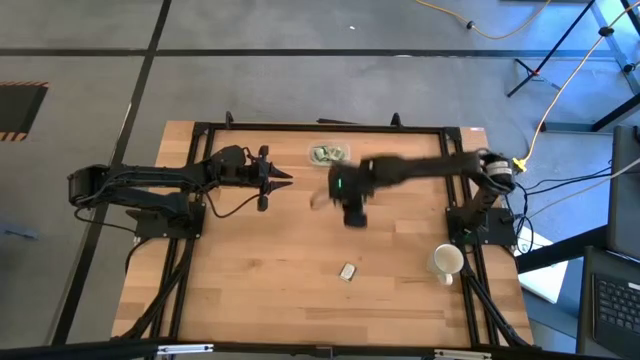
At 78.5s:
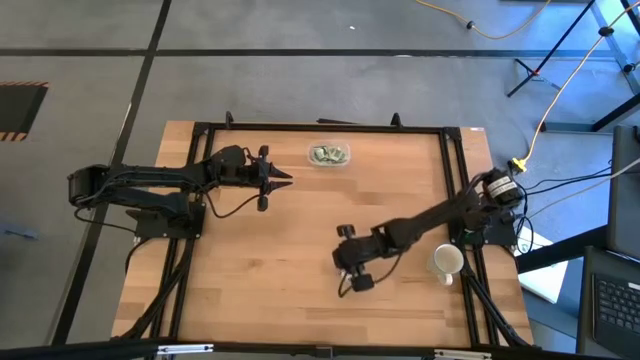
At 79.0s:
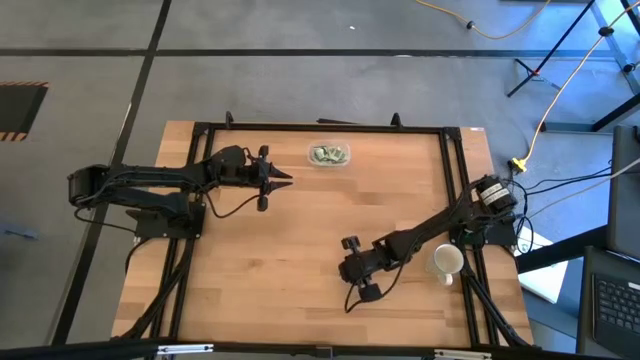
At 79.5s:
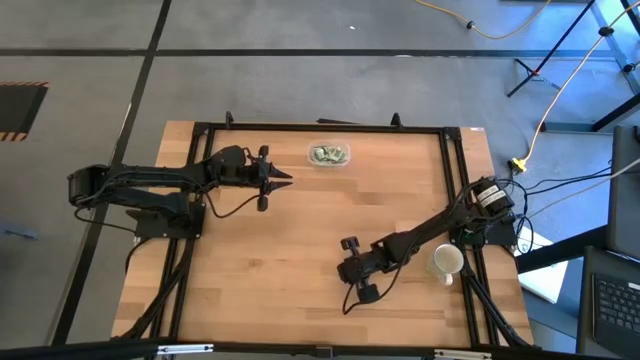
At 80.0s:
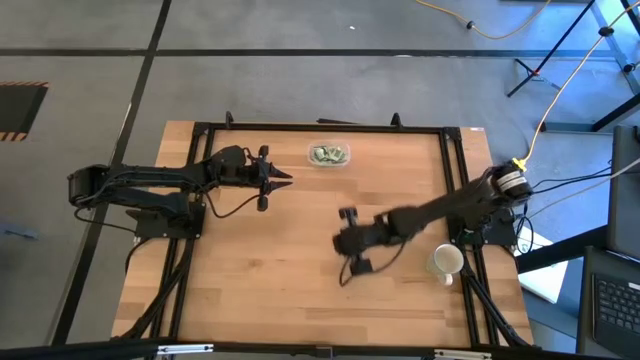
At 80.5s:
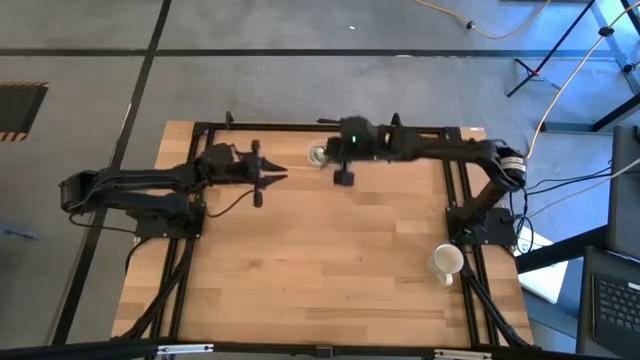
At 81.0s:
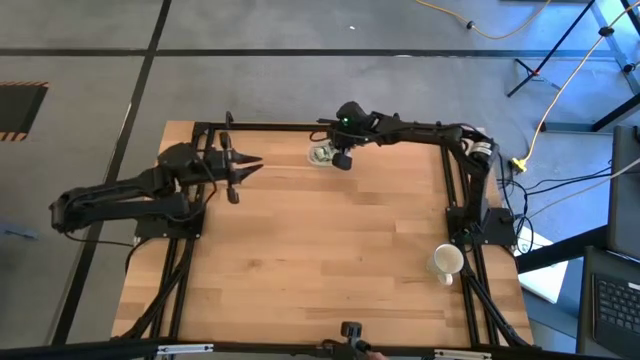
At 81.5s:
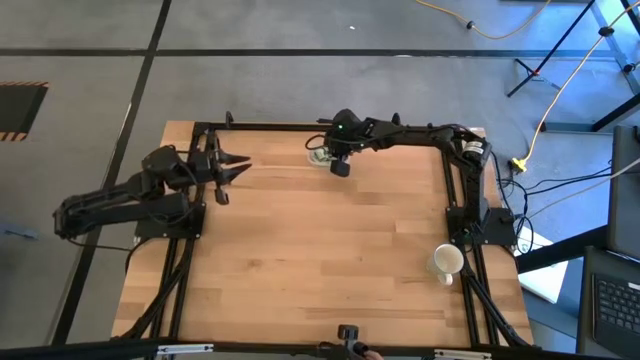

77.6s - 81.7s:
Task: Pick and place items into bin
Put the green stevia packet into the transparent bin

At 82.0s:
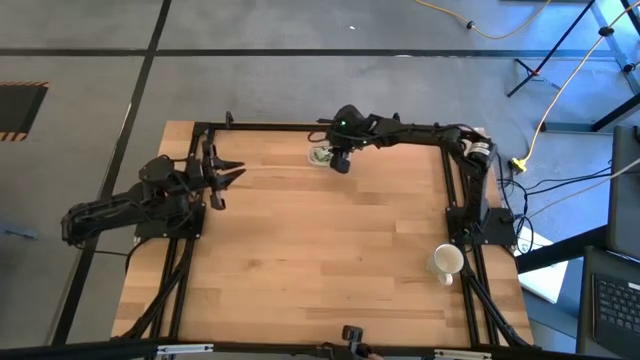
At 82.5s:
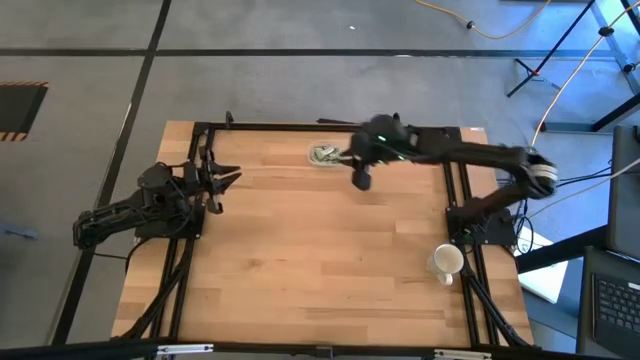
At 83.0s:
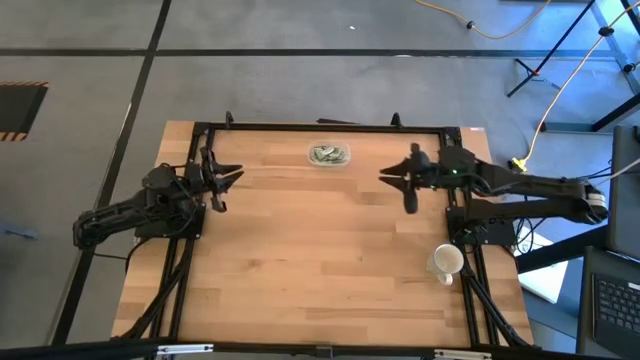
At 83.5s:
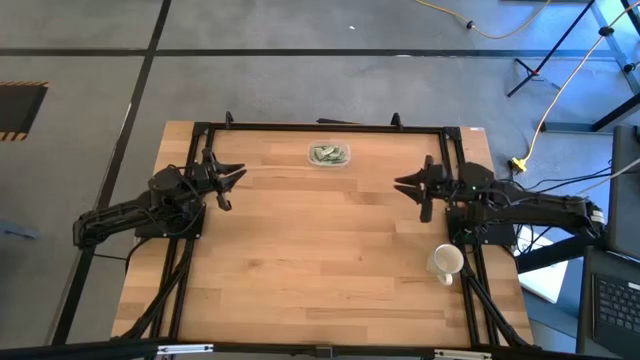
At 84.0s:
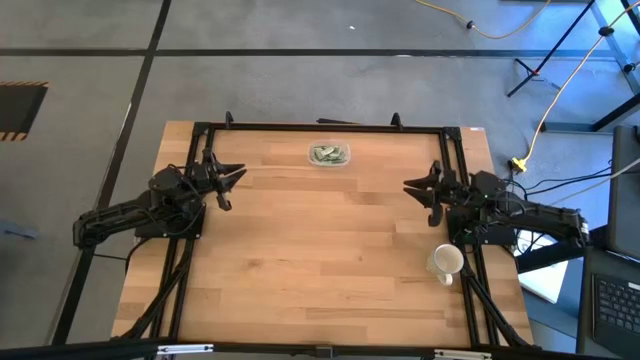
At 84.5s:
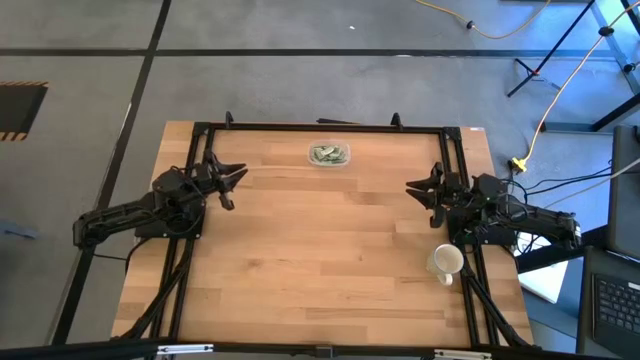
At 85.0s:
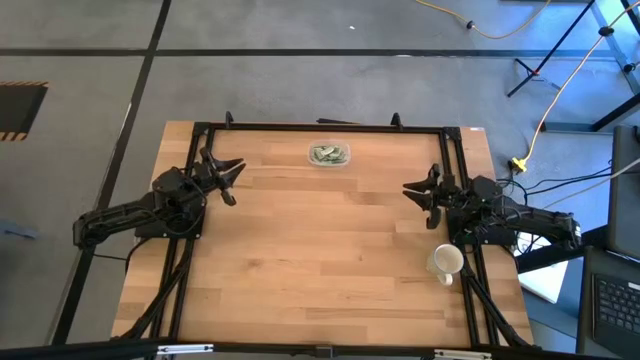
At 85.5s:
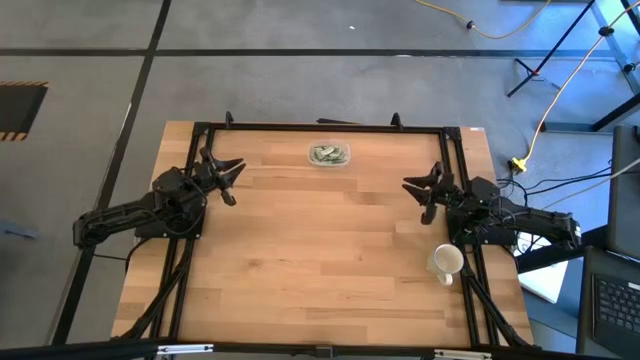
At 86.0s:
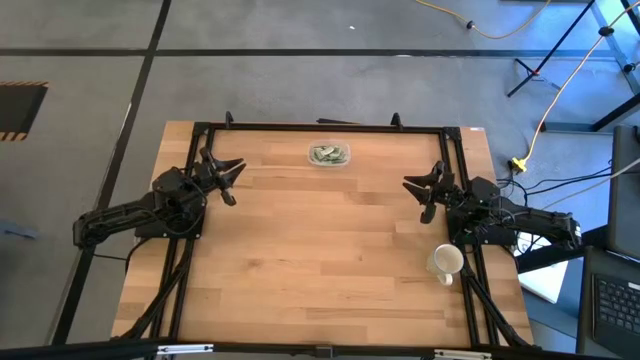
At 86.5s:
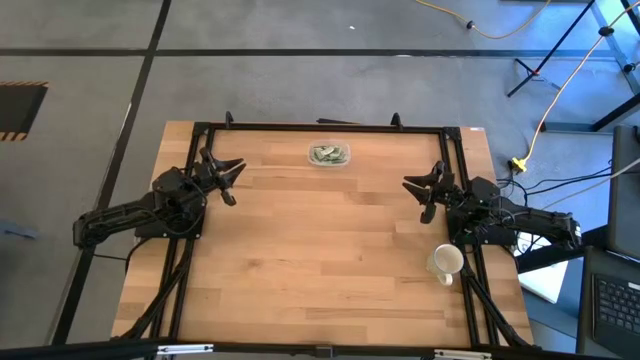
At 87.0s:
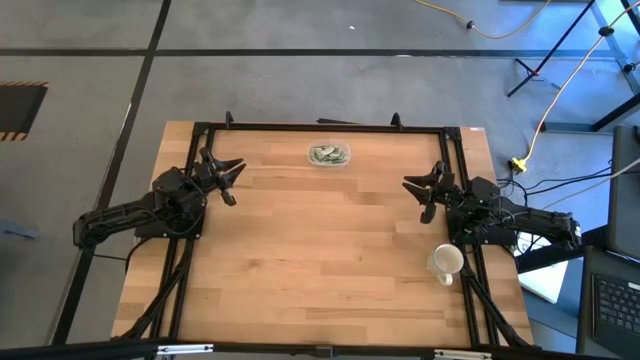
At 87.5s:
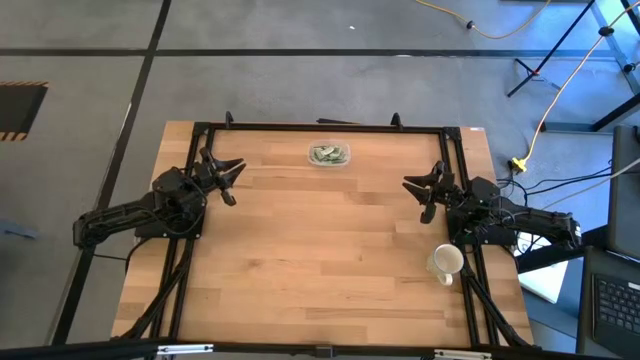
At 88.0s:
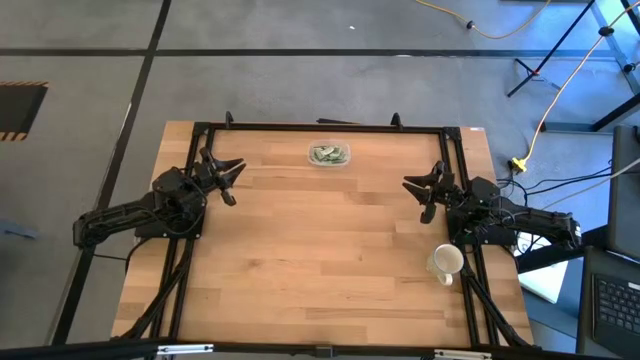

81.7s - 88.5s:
Return to Home Position

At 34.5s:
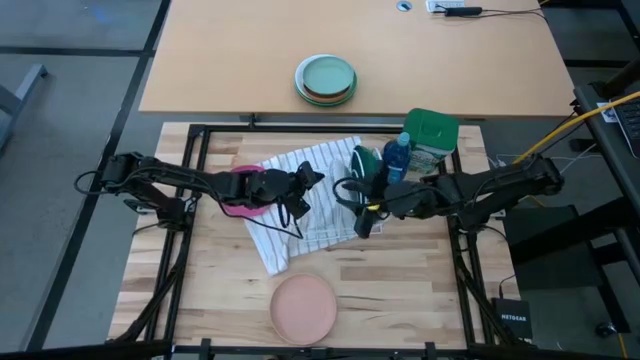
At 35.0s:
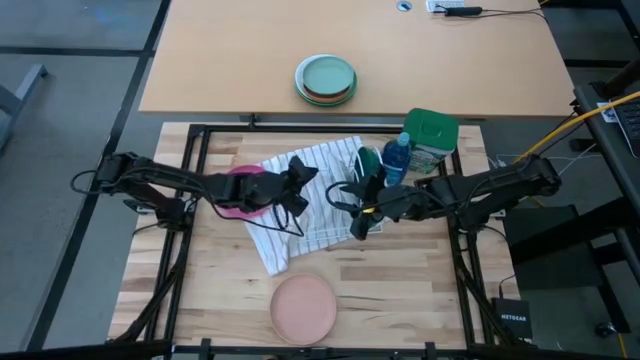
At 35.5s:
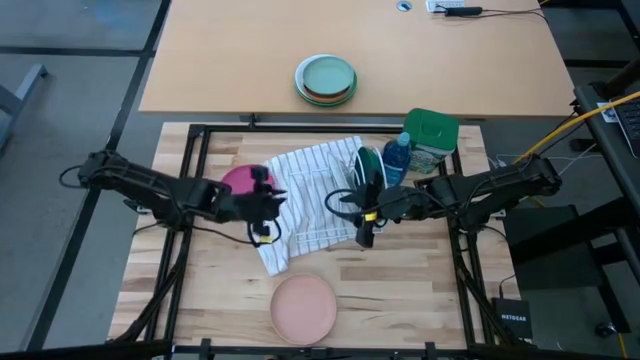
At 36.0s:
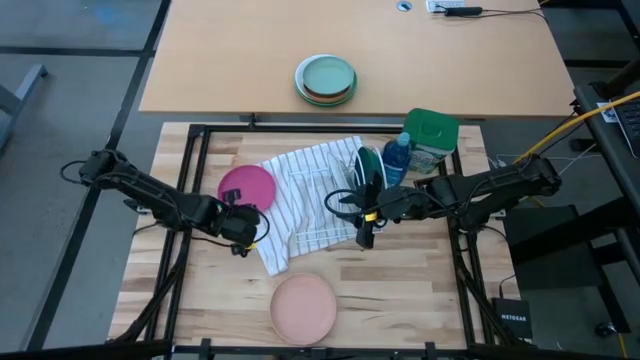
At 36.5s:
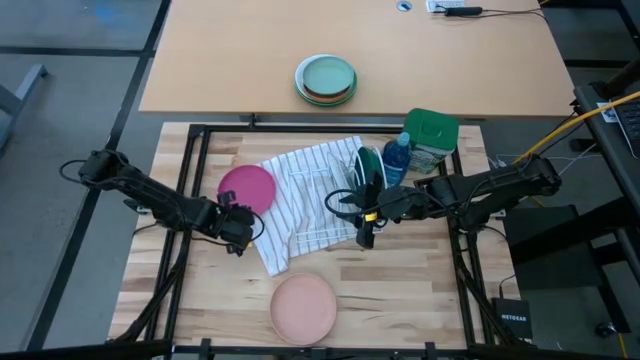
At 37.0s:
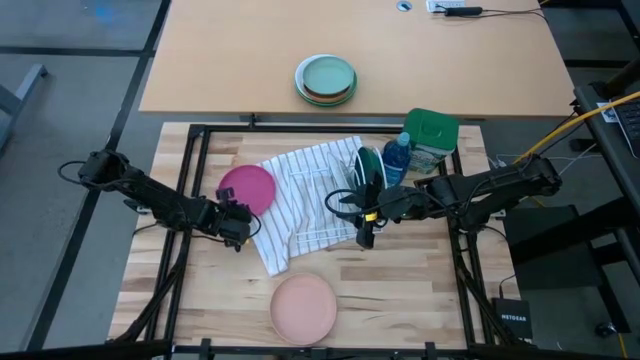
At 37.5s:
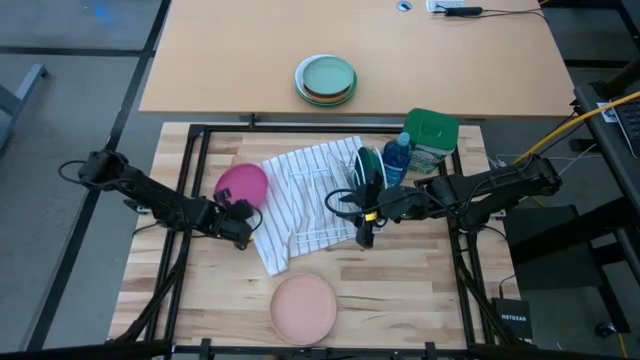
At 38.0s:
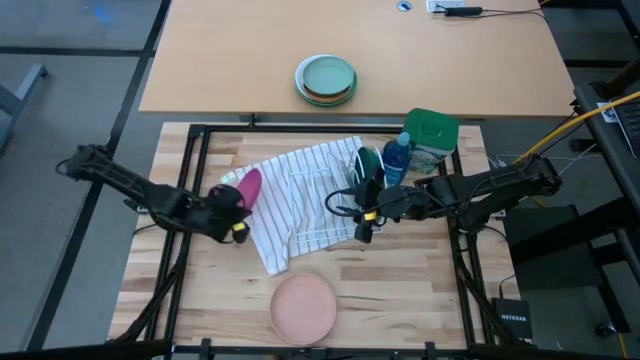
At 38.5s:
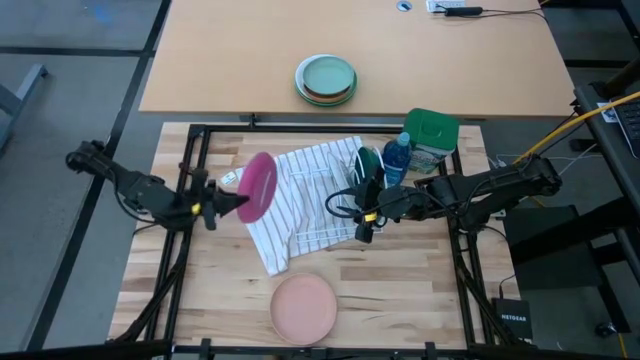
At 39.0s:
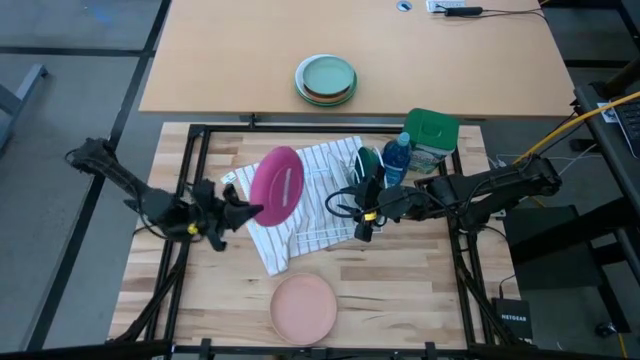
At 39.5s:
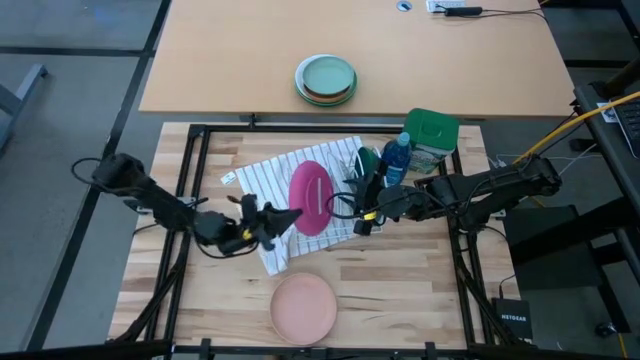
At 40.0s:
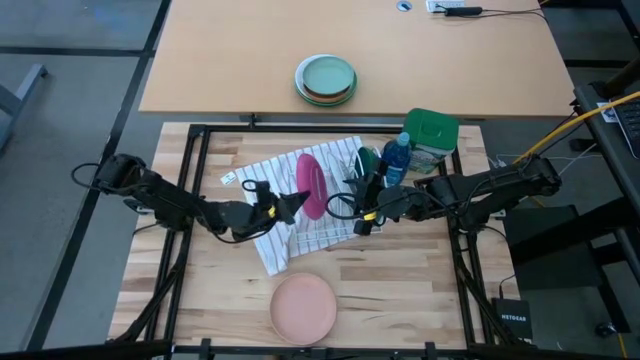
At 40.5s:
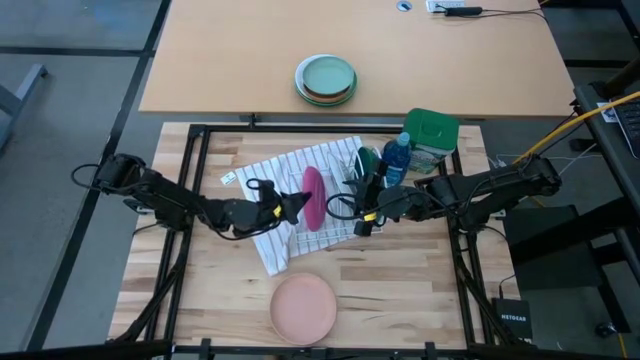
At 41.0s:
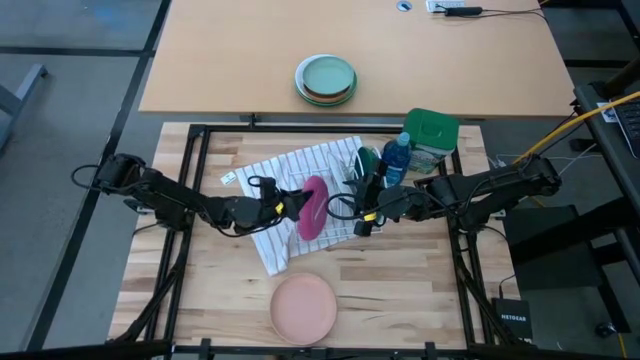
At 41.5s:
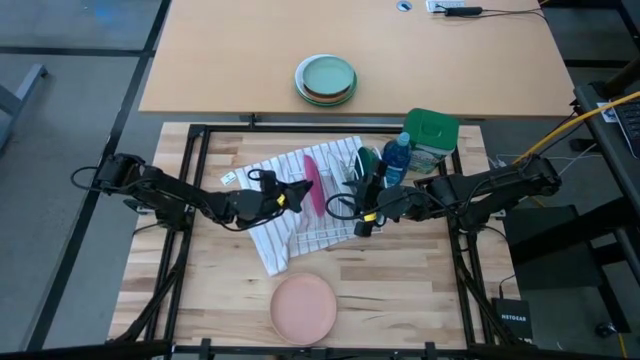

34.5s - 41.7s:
Task: Sort dishes
Put the pink plate in the dish rack

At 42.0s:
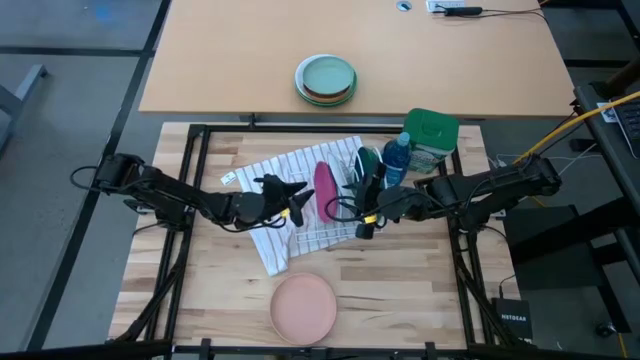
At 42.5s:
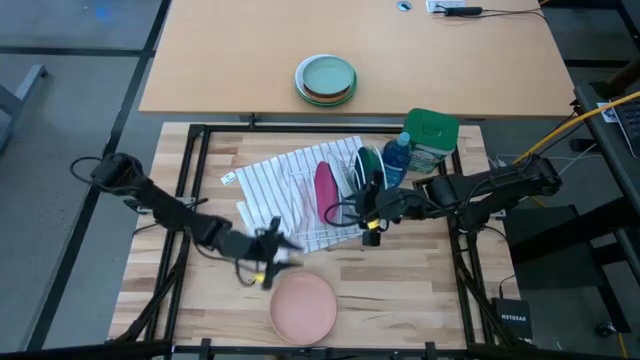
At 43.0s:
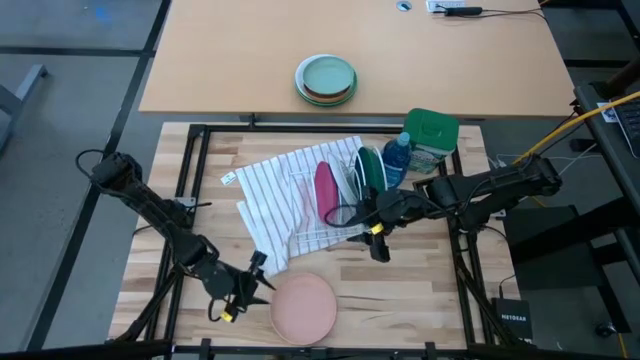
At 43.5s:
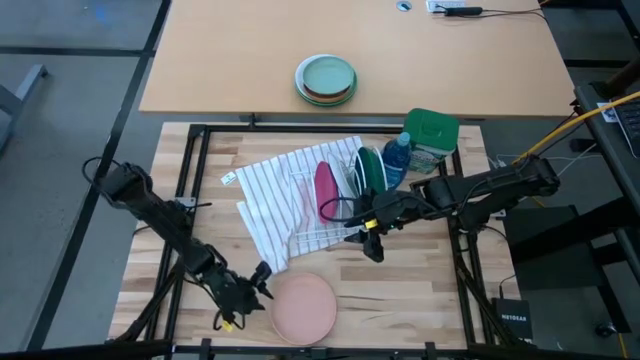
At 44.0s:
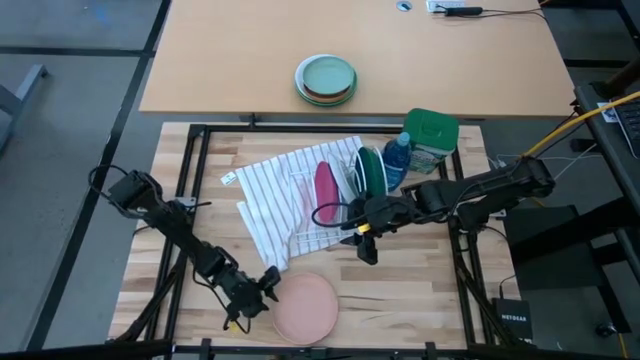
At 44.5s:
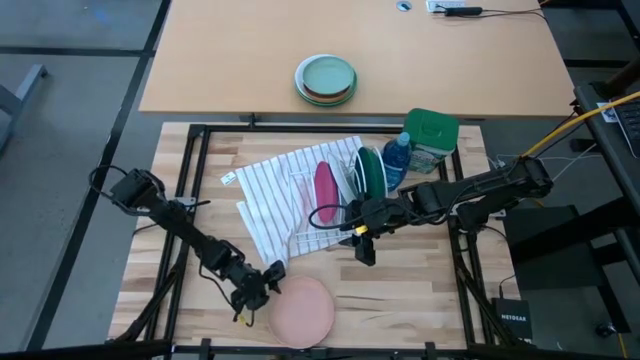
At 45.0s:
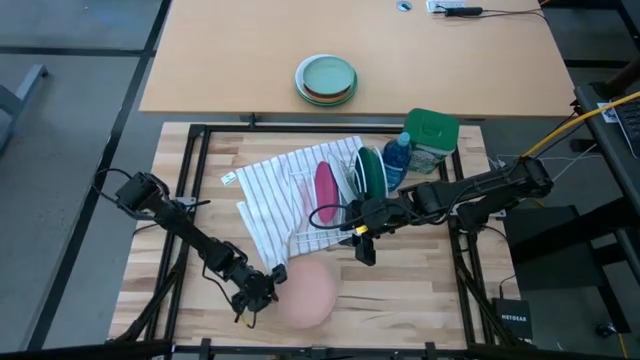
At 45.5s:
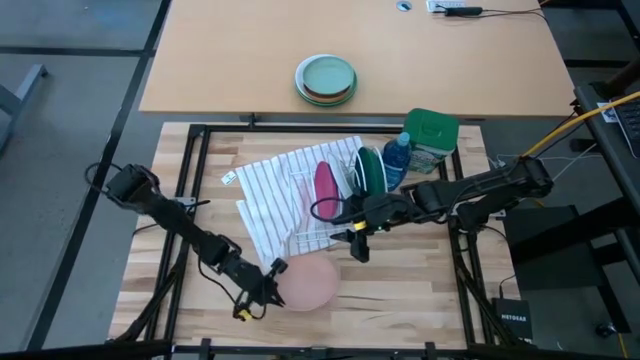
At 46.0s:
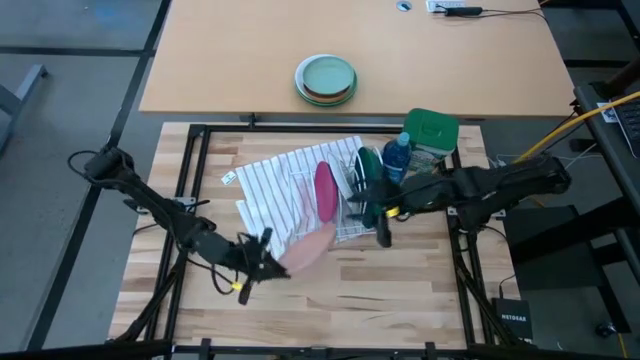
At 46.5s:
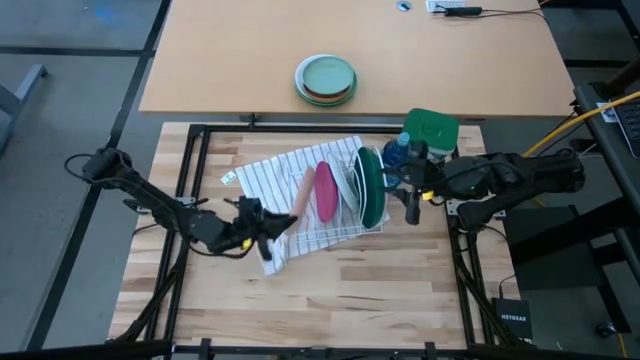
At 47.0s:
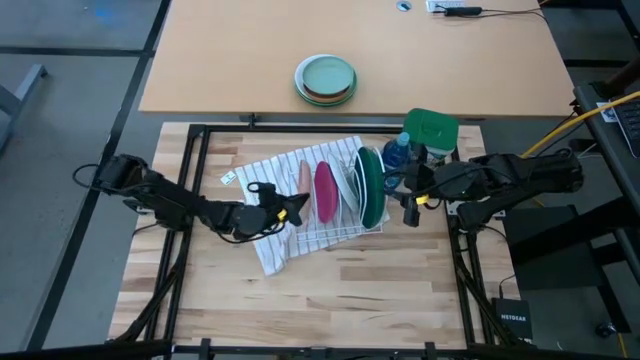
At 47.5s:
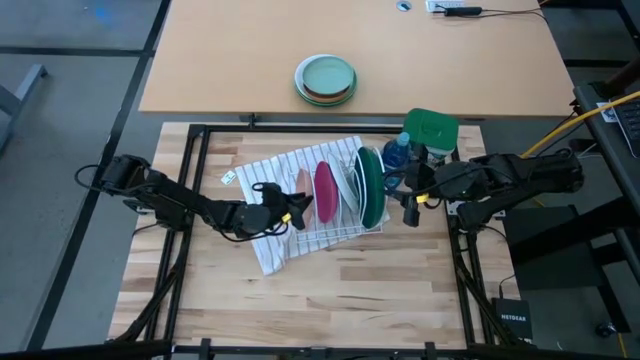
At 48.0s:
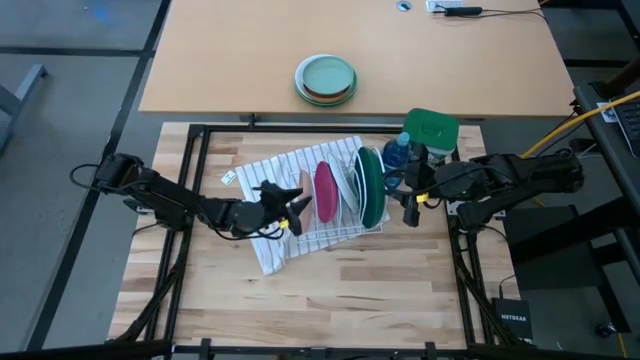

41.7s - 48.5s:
Put the light orange plate in the dish rack
